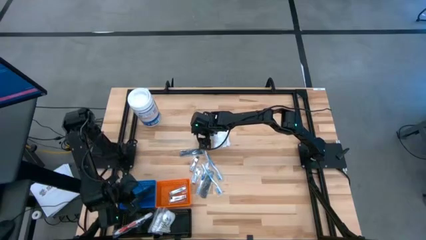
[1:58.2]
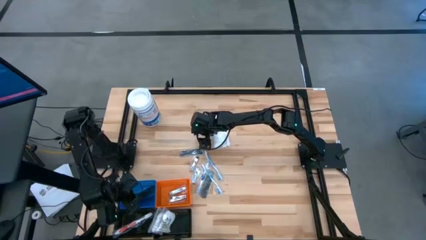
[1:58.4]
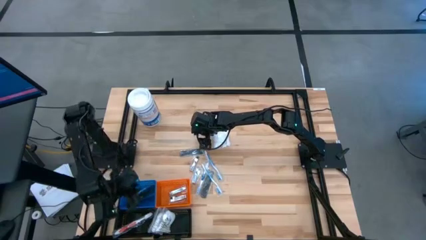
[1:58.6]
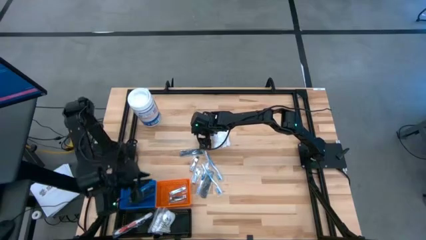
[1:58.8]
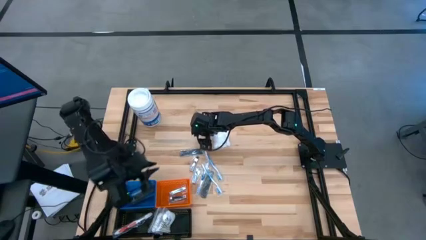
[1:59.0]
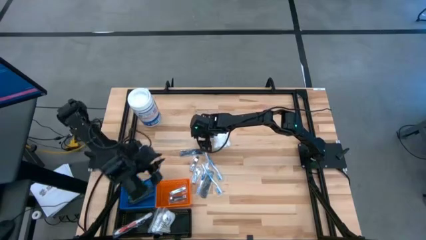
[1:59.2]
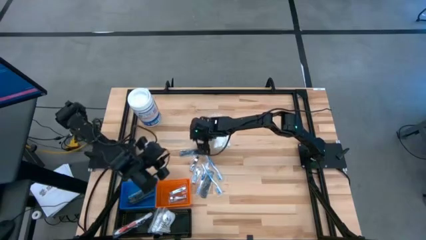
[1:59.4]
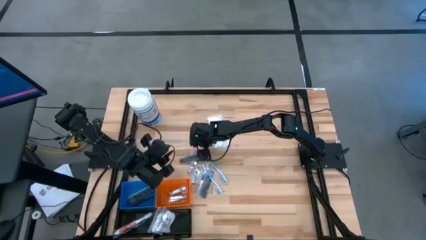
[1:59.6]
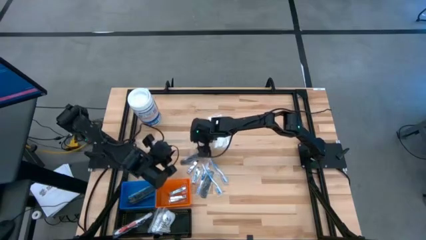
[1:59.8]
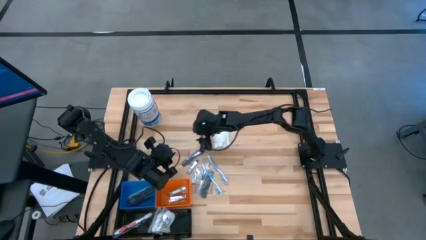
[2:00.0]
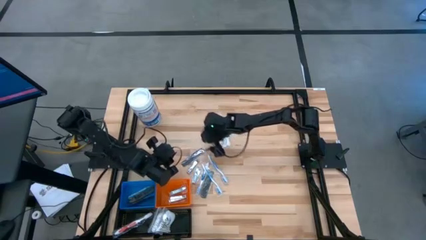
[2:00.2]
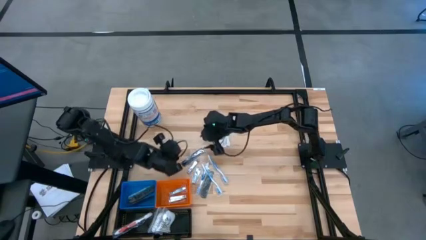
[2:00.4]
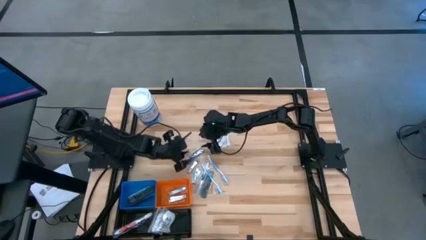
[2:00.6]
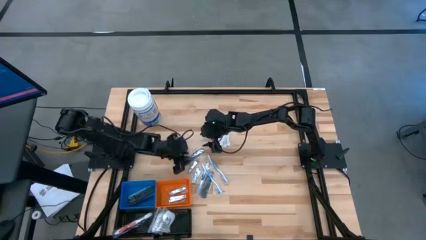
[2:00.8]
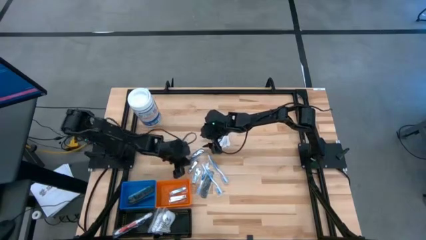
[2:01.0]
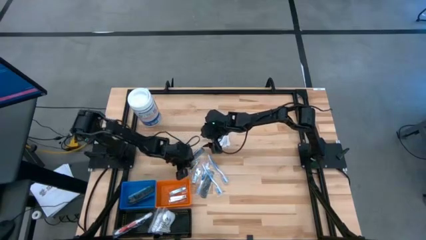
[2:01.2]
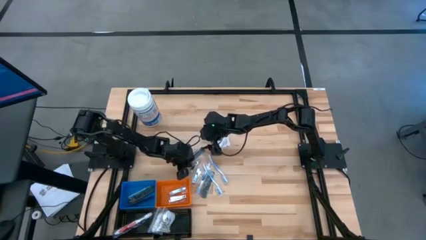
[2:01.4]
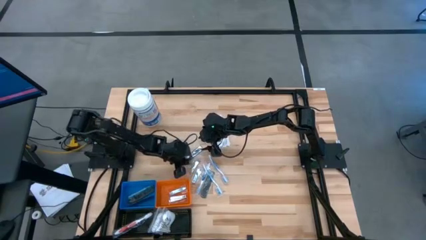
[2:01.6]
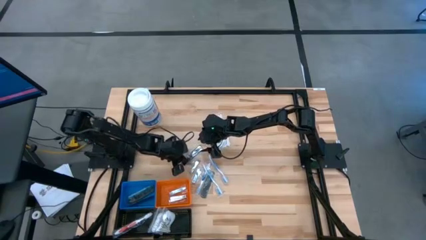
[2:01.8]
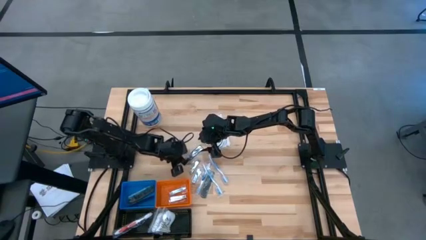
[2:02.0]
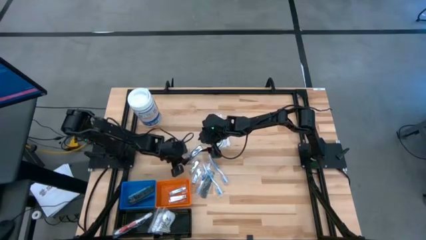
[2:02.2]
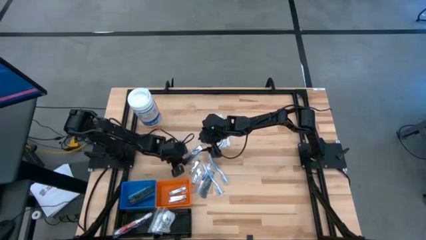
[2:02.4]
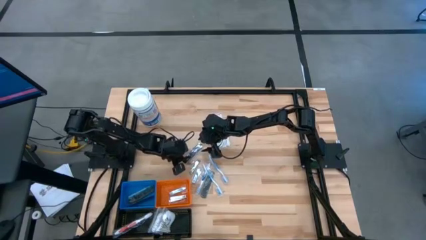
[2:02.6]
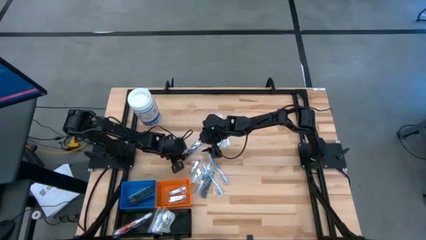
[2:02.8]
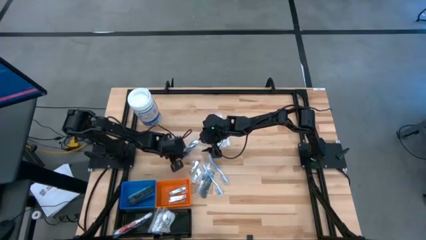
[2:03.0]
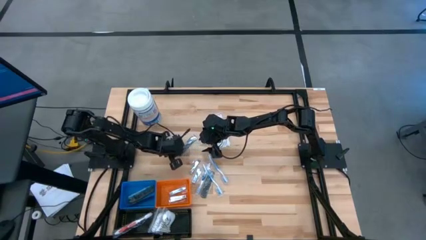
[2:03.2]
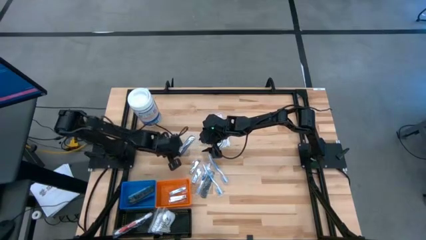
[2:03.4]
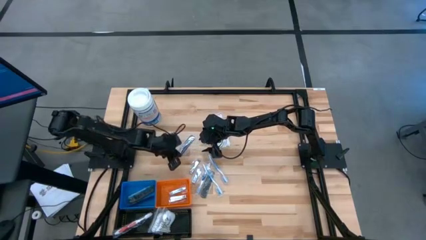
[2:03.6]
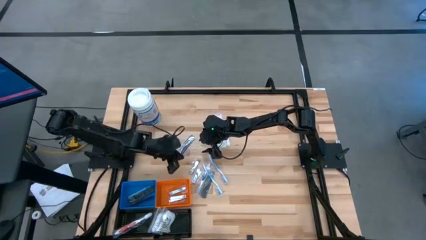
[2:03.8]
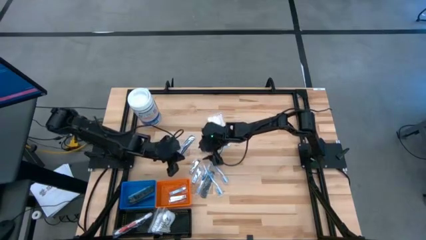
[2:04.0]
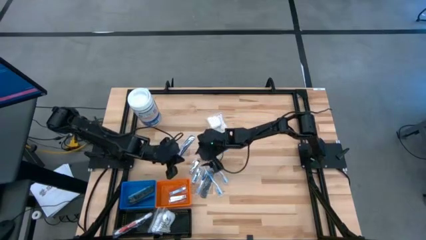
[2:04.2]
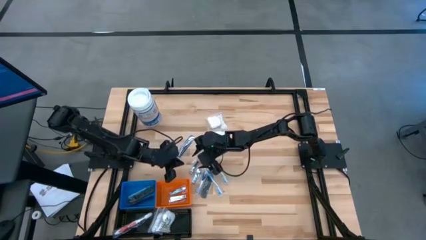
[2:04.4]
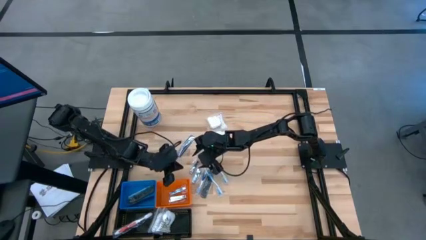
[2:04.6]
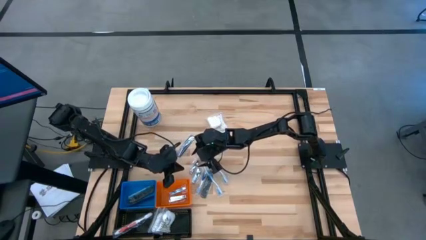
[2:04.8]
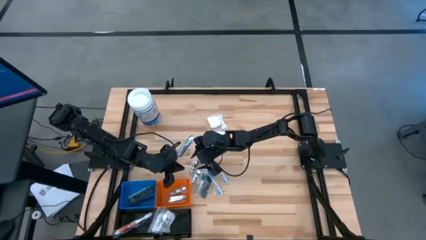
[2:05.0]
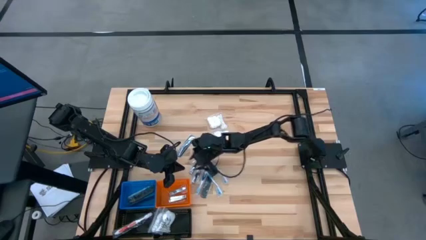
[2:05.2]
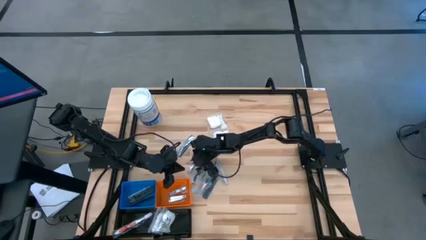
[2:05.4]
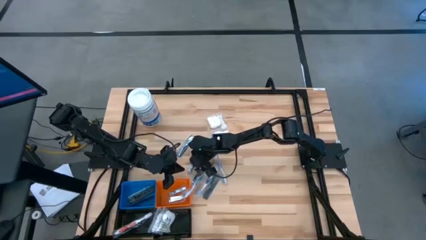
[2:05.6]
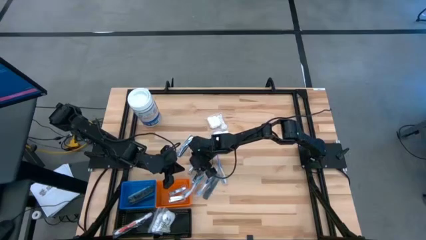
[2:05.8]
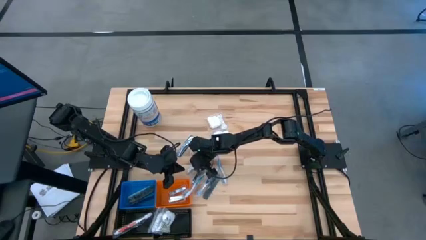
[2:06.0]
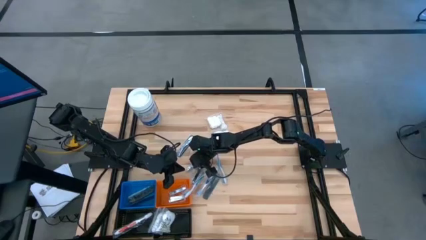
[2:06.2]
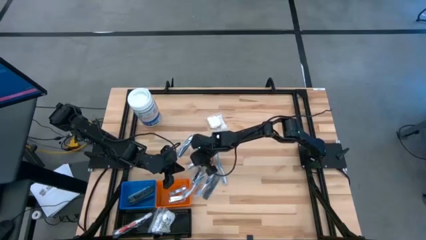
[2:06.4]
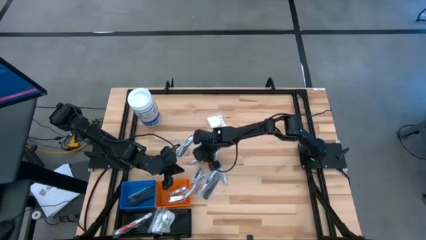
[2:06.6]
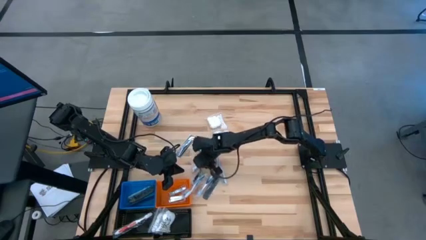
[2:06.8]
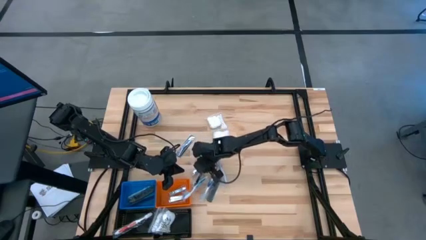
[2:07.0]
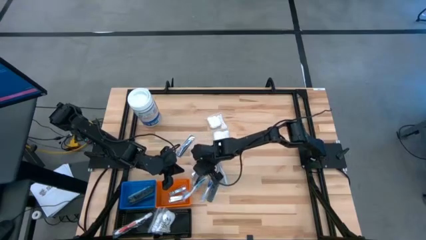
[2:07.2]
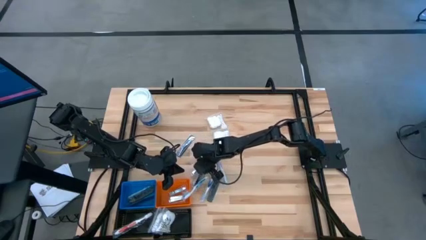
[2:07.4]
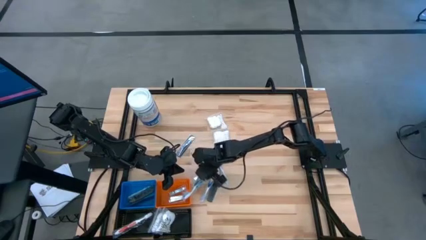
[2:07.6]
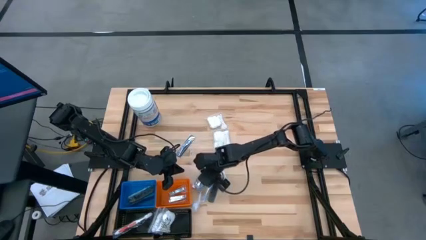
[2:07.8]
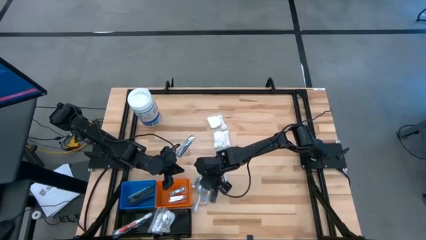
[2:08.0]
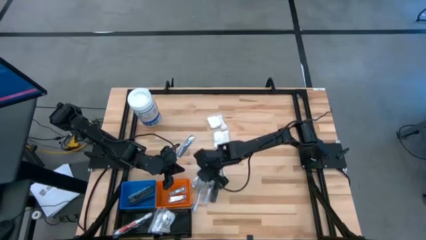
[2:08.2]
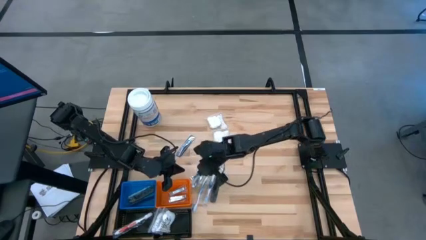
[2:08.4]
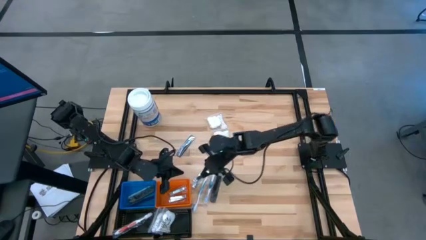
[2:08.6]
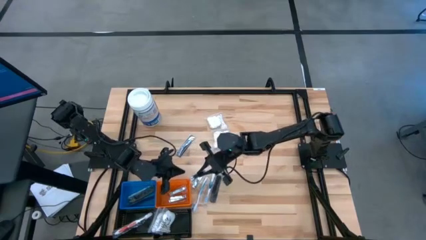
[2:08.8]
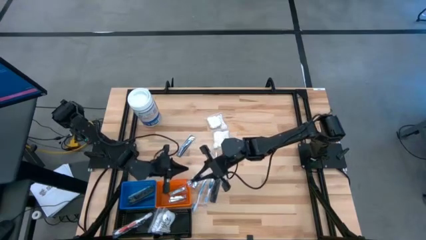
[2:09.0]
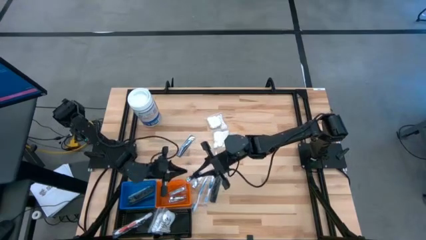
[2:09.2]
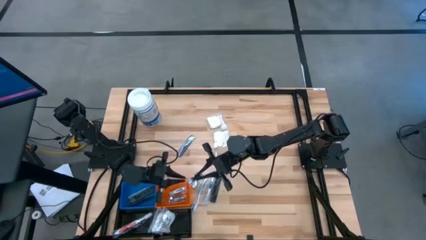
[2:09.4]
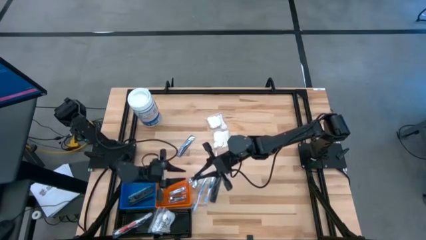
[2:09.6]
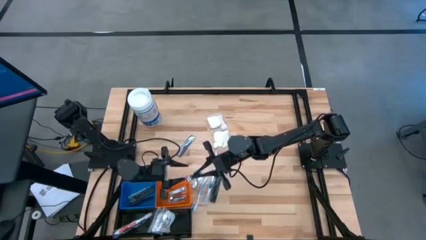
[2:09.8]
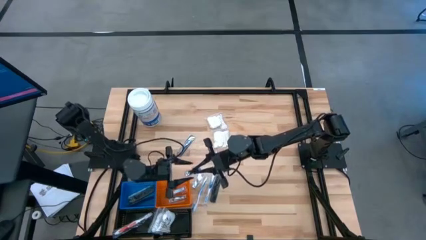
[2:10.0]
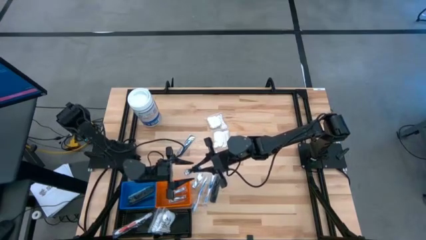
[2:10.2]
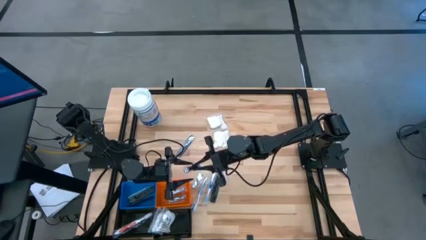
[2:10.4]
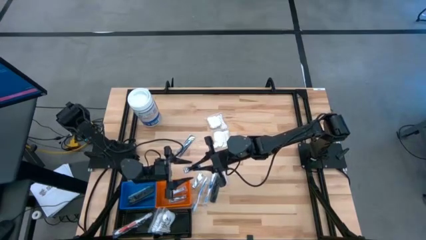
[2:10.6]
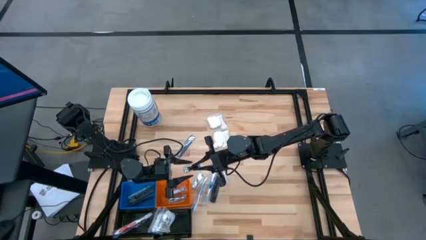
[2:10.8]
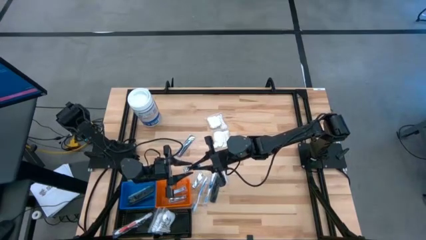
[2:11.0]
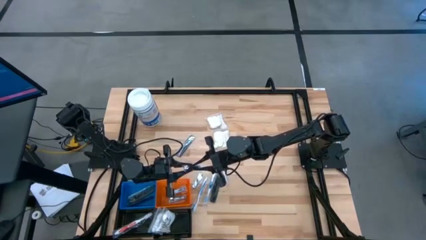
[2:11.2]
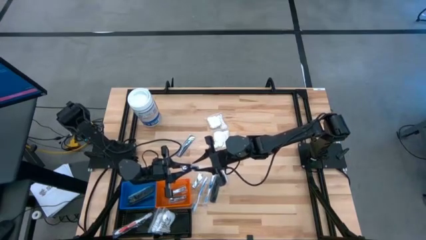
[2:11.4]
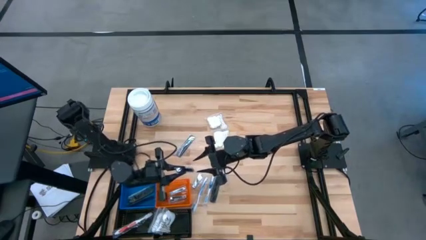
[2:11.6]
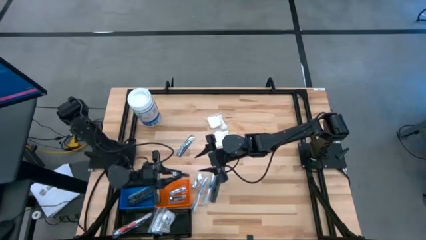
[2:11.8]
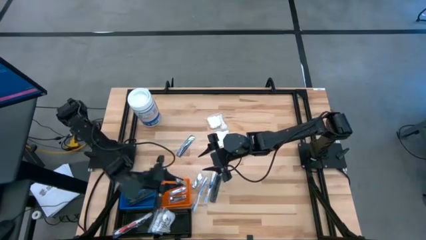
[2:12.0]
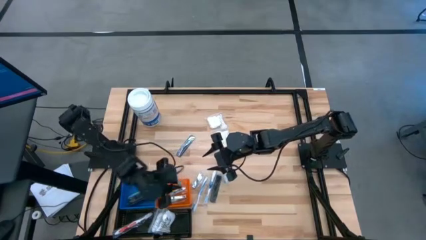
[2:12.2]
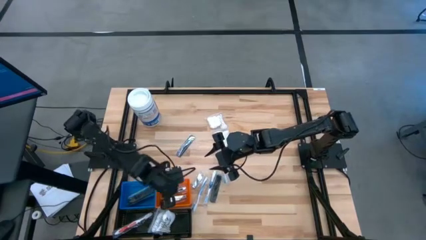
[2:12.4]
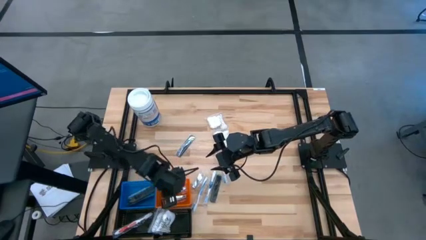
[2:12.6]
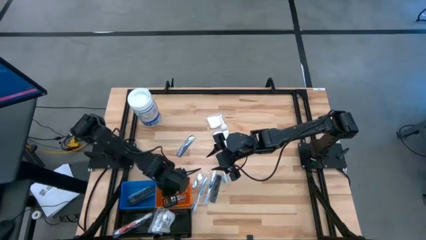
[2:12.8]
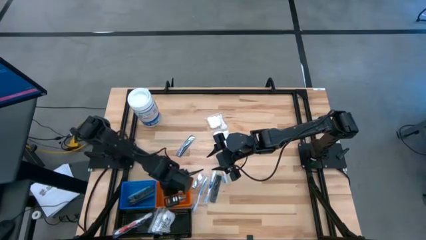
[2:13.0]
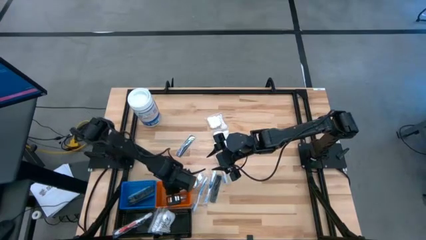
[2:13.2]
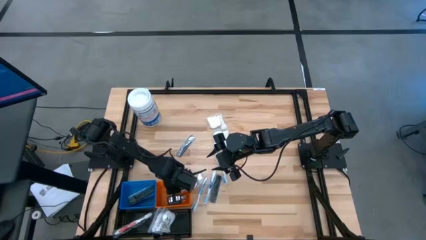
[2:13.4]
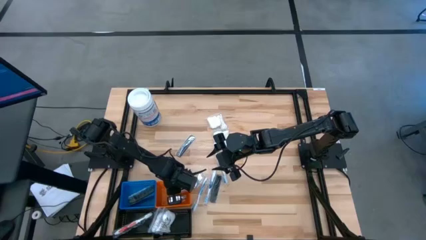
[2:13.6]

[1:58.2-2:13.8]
Task: Pick & Place Travel size toiletries
Put the top nail cutter into the orange basket

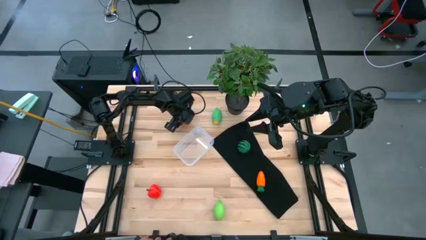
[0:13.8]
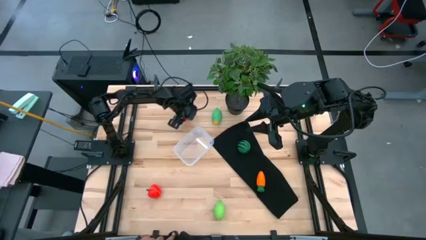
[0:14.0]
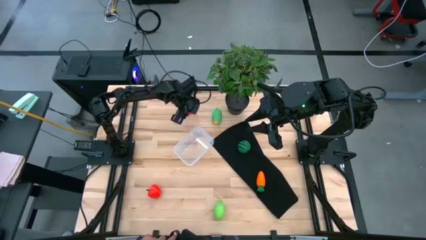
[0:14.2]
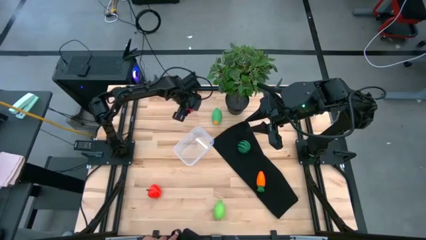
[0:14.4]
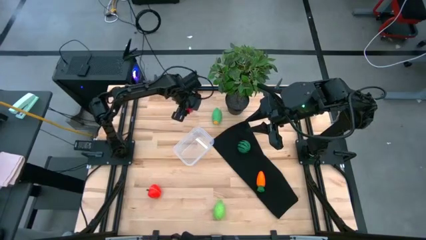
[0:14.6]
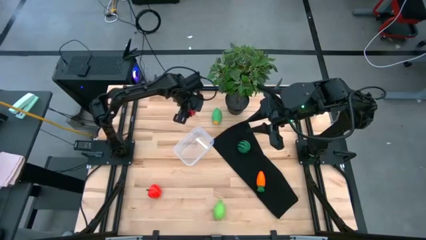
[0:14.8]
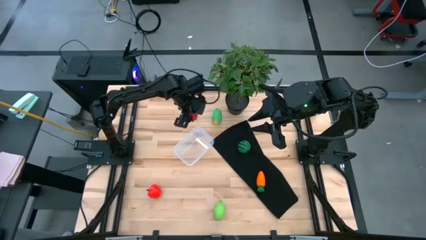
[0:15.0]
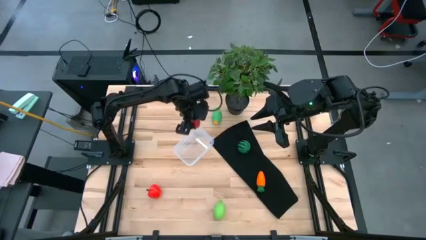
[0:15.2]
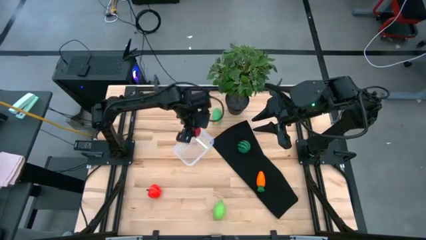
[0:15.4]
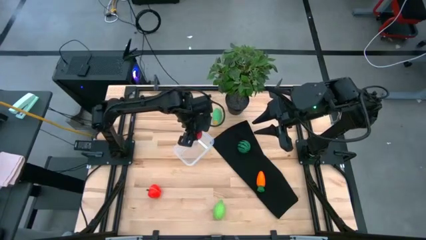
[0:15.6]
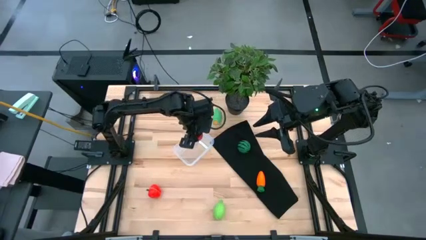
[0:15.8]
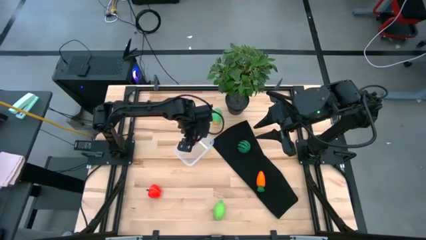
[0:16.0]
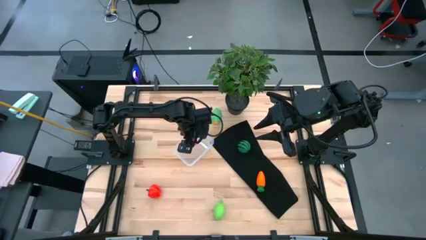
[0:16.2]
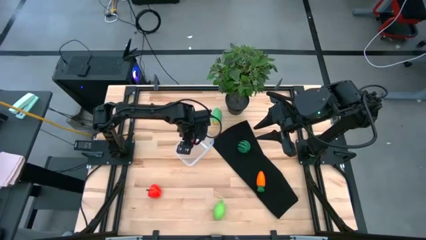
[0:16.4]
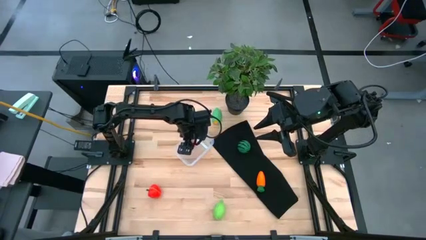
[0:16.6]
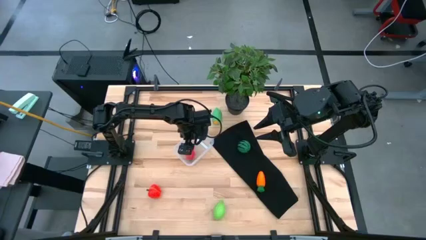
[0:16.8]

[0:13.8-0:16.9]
Task: Pick and placing Produce into tupperware
Put the red dragon fruit into the transparent bin
